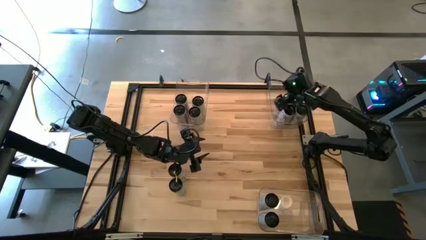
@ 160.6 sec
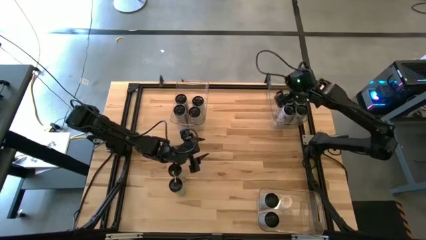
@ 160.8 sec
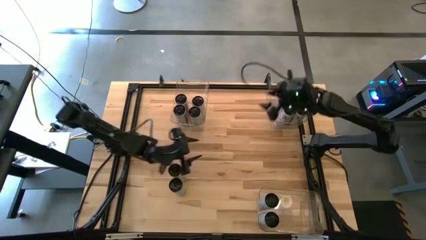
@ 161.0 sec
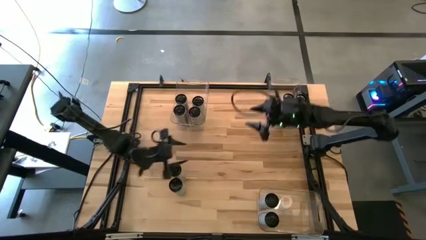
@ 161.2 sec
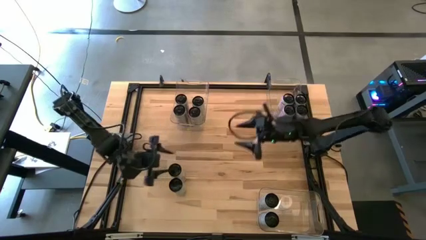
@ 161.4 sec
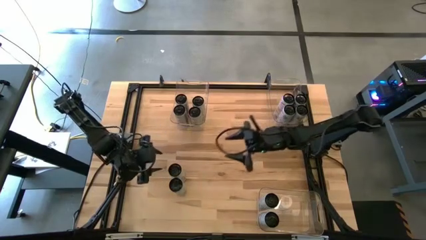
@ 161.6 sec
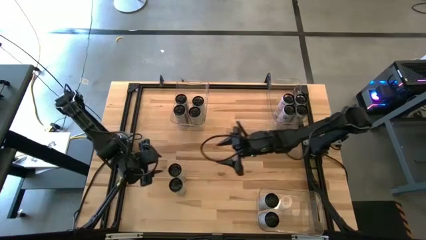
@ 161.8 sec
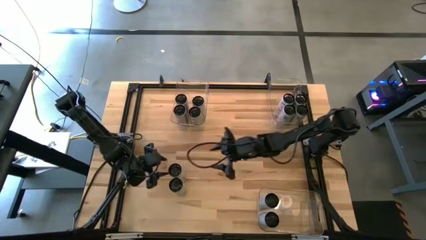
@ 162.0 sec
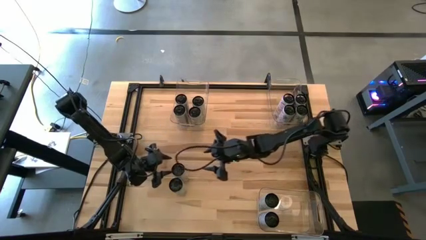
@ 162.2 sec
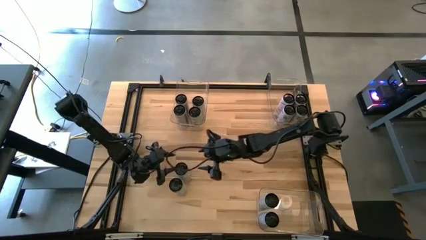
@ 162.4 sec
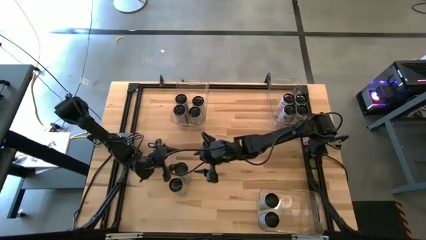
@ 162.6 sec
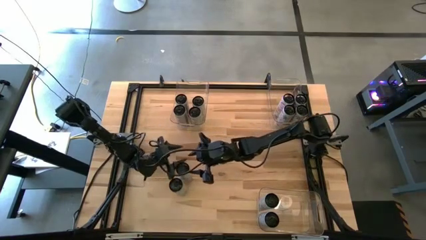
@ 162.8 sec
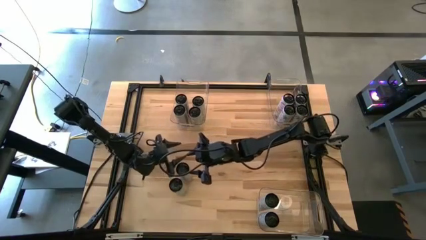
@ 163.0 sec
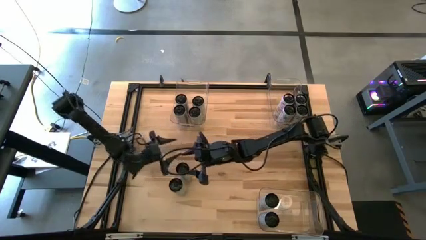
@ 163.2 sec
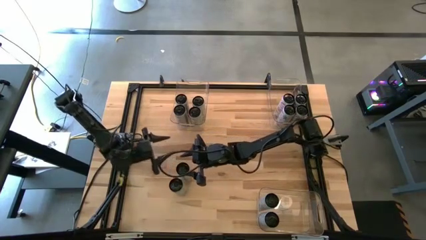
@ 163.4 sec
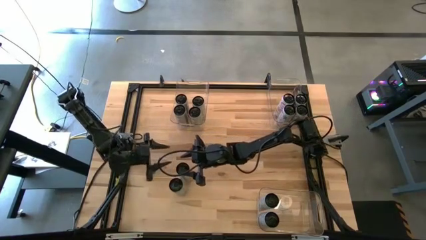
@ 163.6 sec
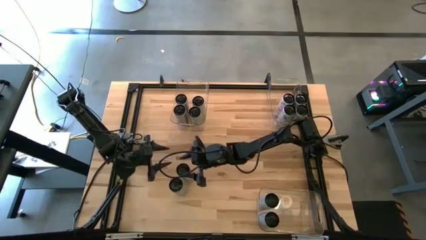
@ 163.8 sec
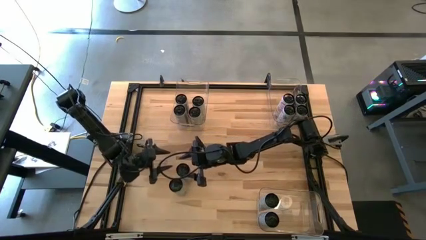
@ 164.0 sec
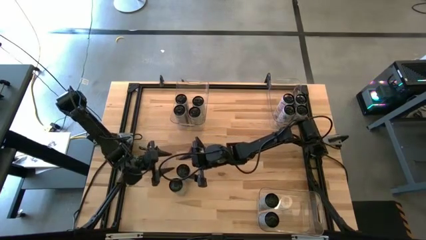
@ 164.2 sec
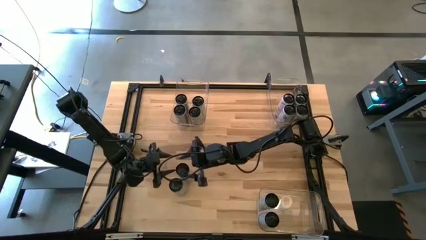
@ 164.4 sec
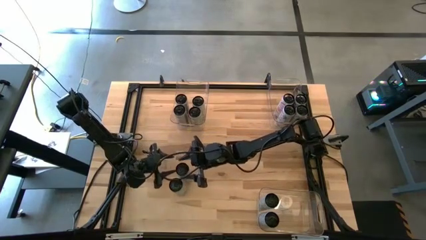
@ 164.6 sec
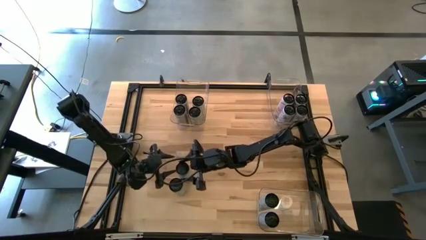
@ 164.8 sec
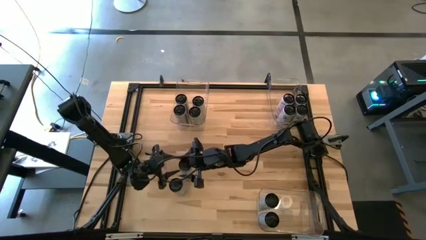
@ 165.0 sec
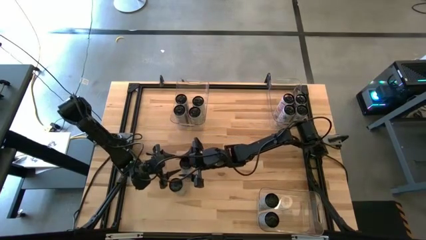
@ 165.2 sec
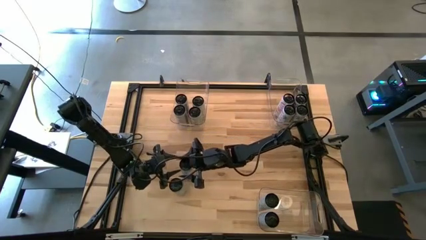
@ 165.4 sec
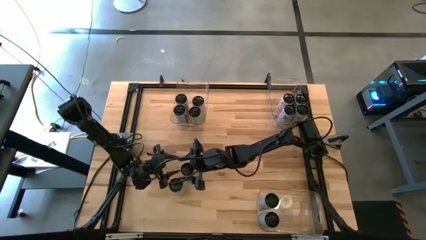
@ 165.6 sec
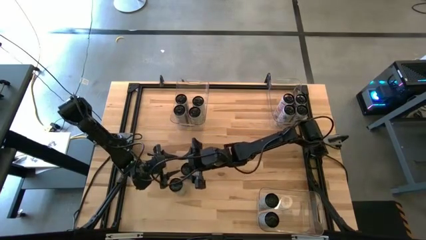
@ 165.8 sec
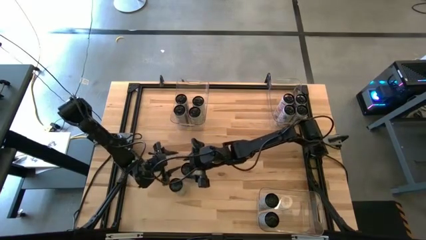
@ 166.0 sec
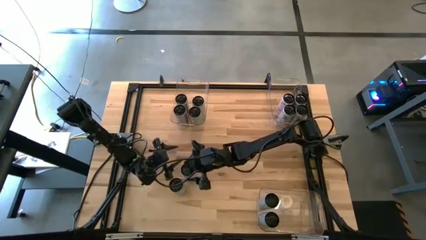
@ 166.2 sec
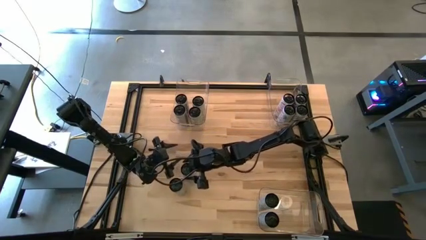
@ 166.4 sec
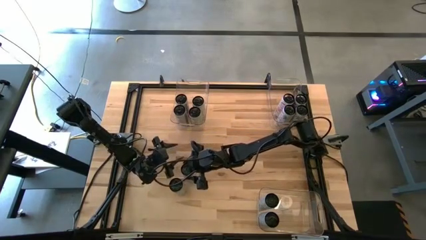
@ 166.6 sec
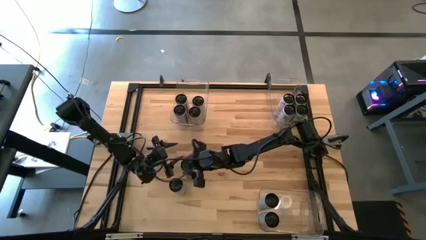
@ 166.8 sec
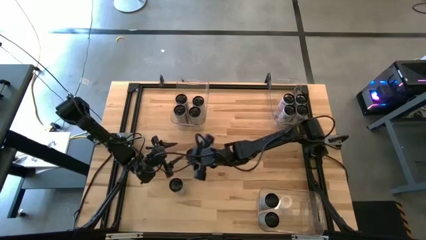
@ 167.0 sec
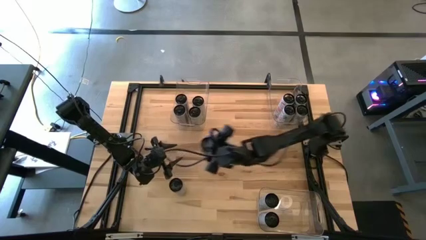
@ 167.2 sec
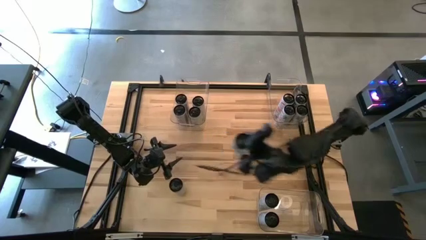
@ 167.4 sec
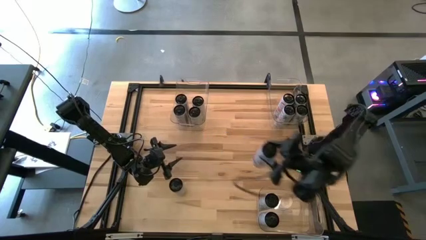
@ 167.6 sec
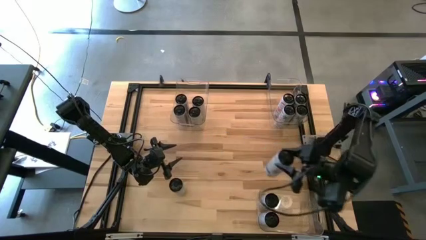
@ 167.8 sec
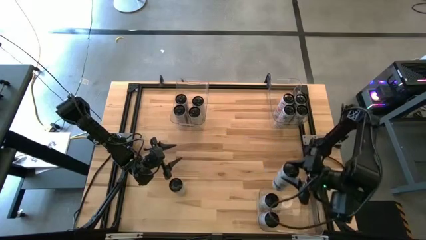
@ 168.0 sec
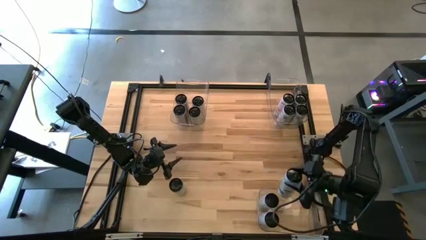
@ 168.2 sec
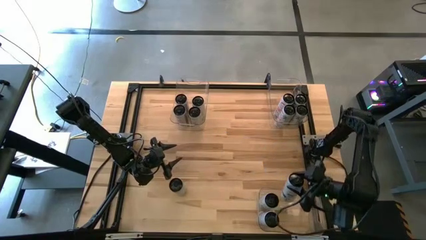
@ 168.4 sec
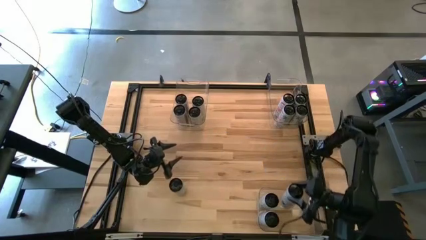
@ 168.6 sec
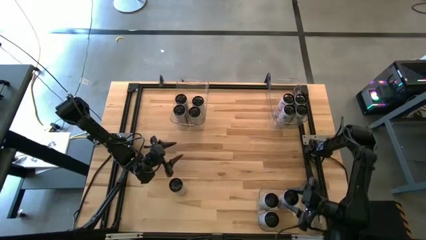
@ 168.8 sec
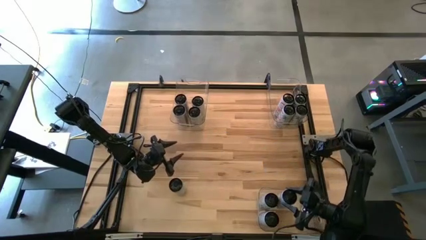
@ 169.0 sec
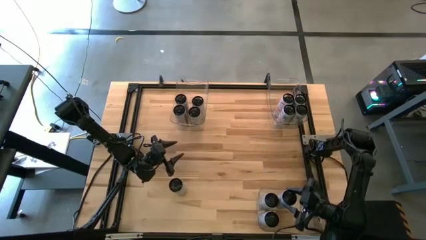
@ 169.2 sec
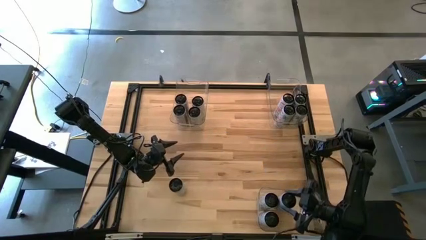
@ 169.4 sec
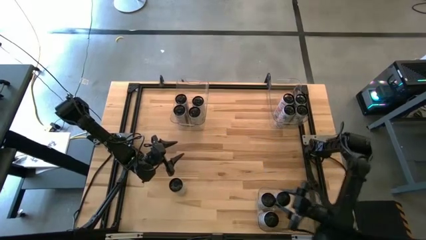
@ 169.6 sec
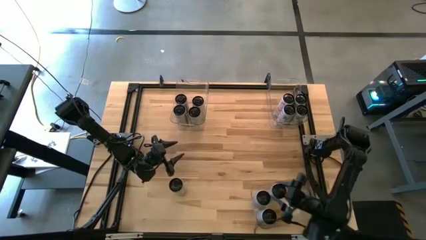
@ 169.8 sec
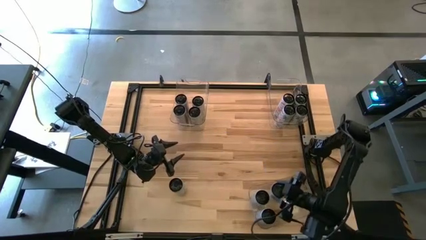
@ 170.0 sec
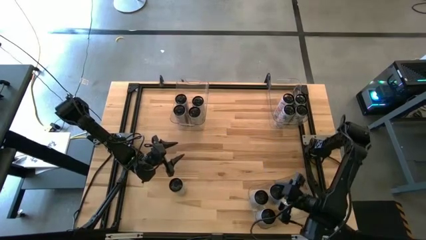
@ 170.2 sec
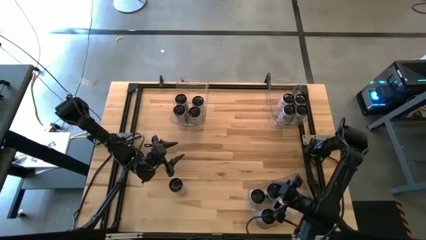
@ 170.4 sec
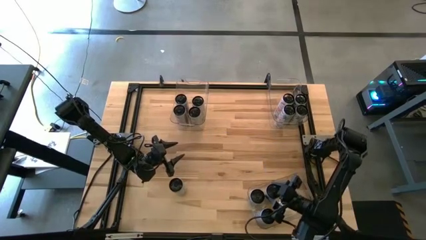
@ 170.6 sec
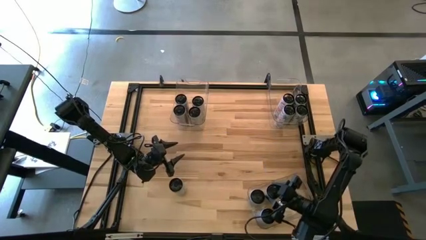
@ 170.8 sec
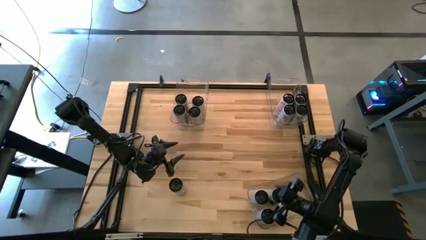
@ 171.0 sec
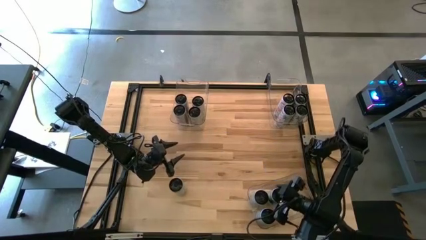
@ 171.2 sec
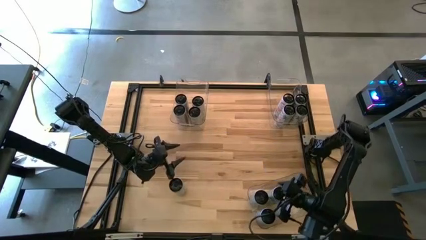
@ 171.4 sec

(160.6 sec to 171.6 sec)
Task: Sort soda cans
Put the white/blue soda can into the bottom right transparent bin
